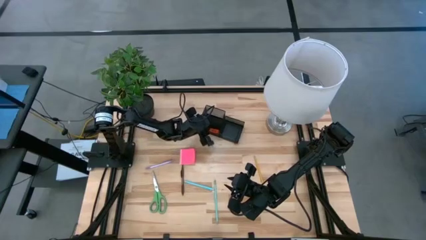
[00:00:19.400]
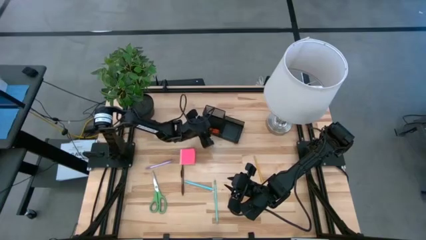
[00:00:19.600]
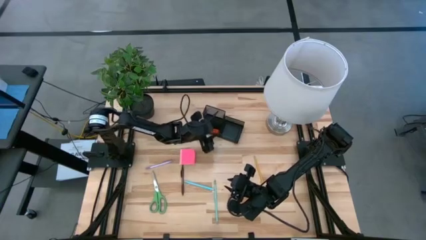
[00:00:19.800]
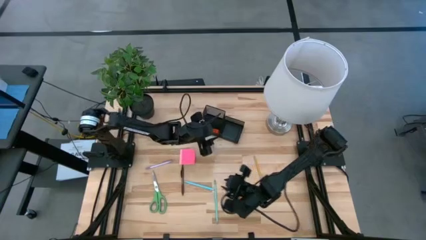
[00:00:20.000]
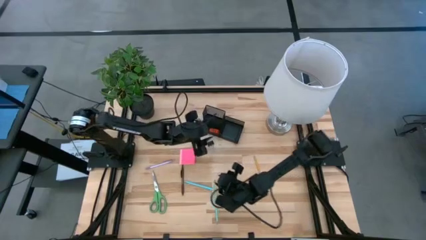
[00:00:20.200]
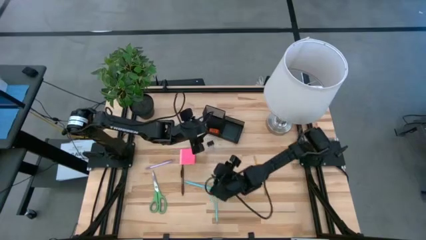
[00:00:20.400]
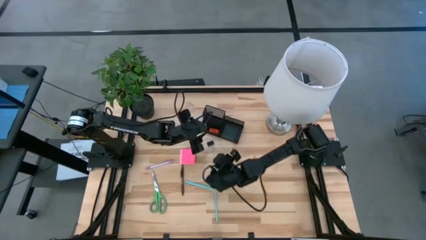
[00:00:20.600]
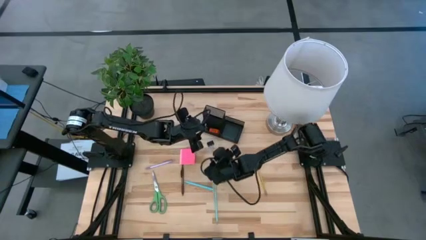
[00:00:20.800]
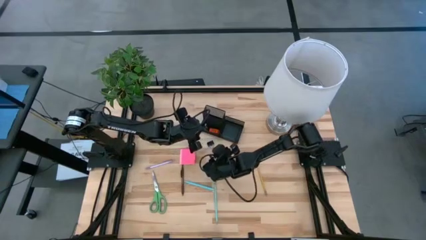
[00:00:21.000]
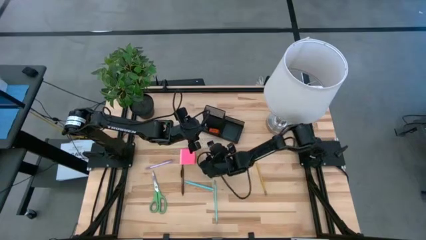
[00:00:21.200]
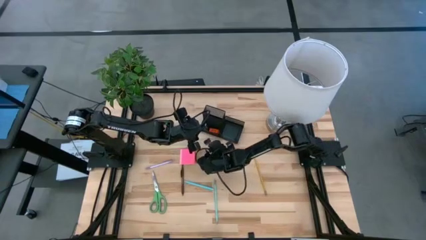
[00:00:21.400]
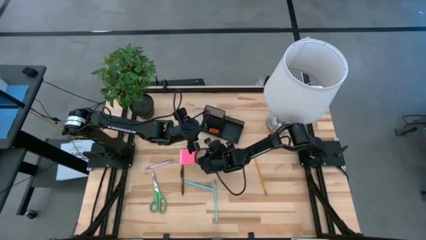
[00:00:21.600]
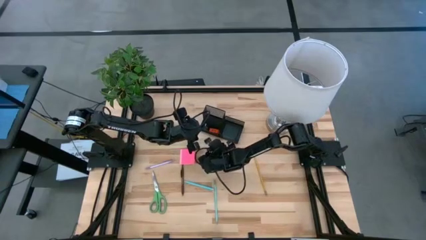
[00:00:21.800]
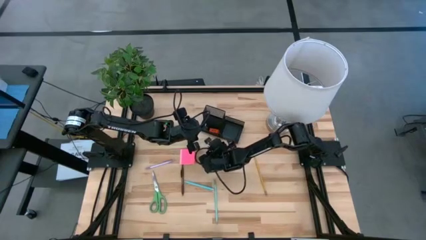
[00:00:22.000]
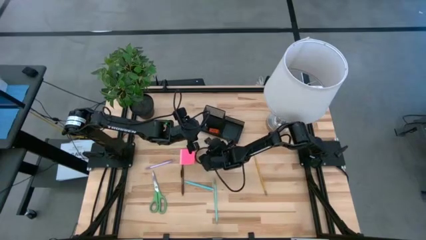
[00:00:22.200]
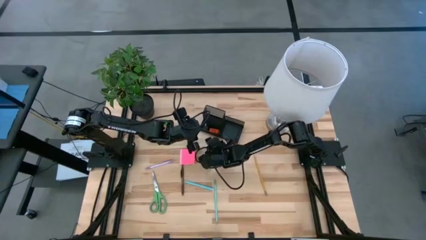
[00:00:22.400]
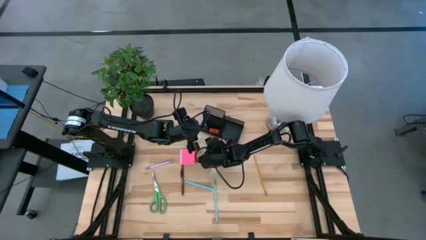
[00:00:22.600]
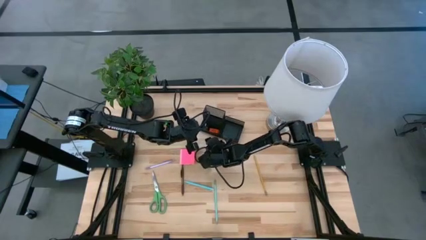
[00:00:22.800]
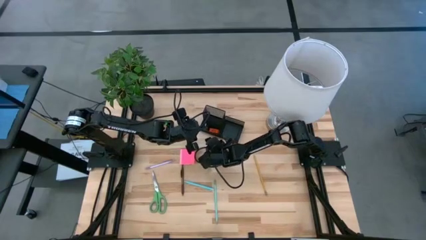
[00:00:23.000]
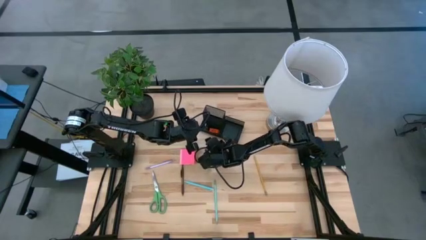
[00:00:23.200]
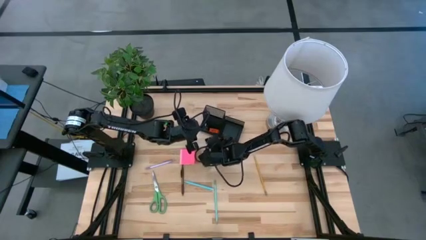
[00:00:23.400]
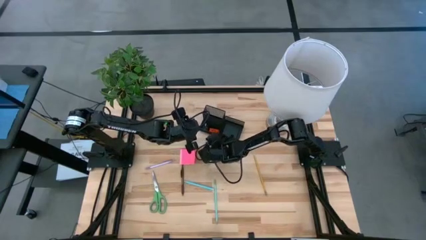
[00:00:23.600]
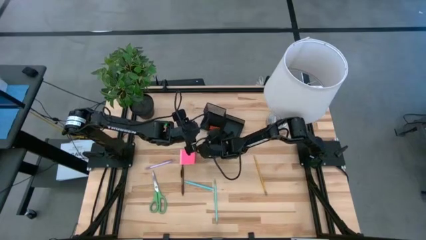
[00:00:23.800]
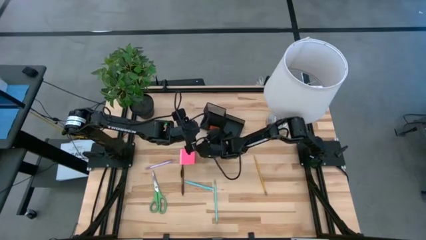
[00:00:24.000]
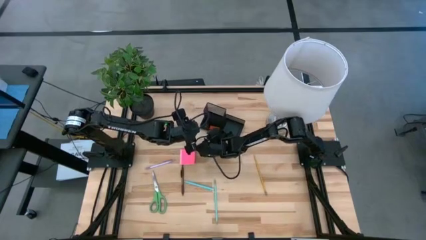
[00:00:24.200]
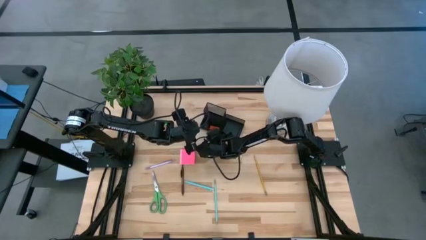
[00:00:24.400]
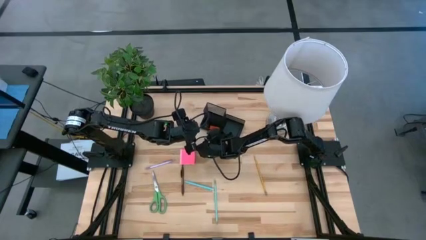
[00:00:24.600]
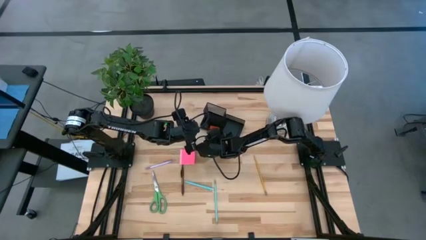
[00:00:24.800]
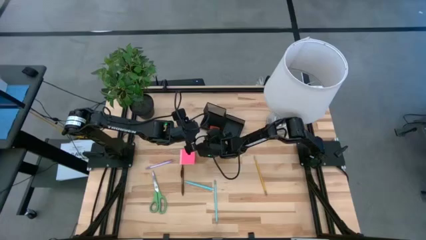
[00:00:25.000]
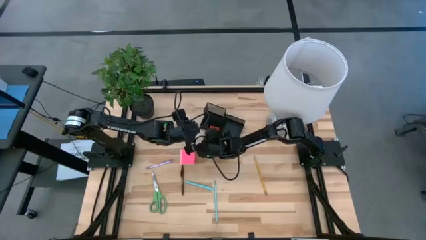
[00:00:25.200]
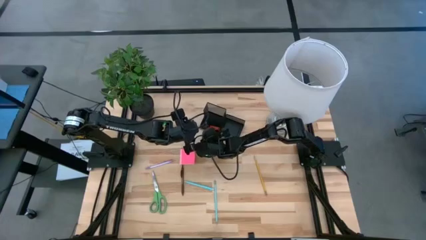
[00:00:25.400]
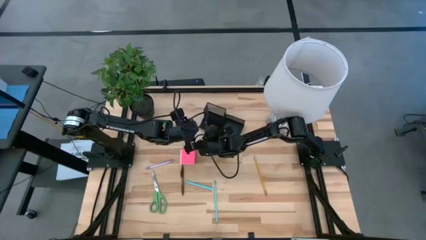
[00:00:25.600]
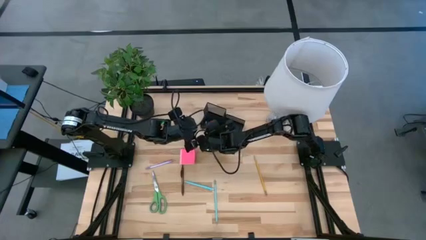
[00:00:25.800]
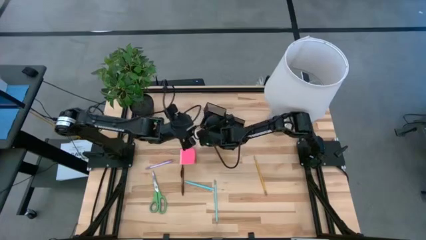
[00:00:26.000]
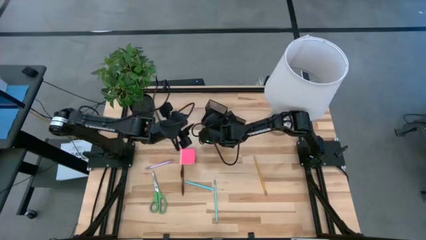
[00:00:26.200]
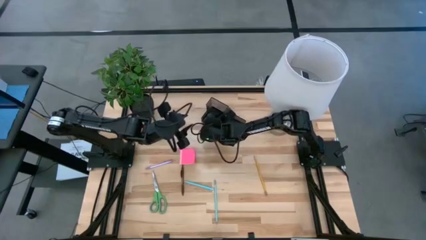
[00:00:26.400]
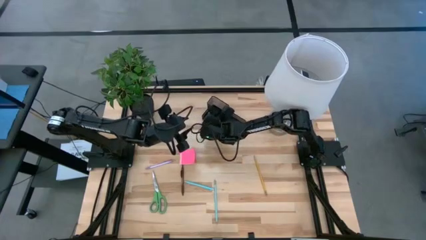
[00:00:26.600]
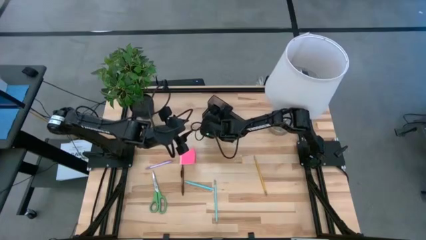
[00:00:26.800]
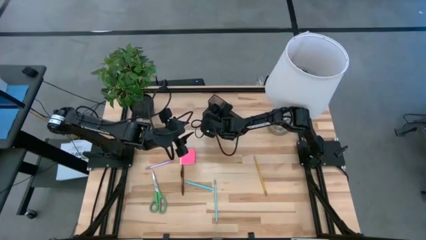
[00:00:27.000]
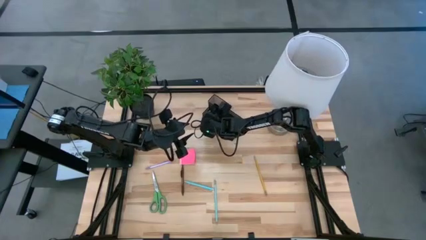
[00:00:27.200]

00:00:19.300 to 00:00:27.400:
Task: Pick and place office supplies into organizer
Put the black binder clip into the desk organizer

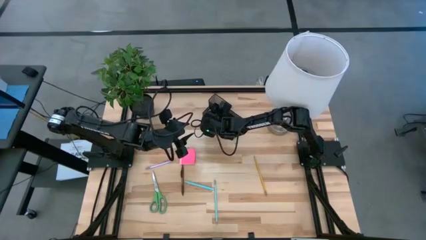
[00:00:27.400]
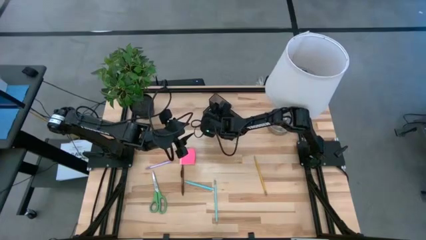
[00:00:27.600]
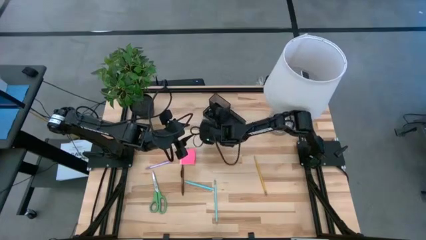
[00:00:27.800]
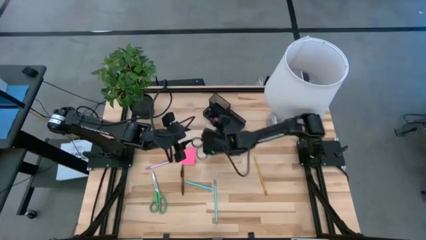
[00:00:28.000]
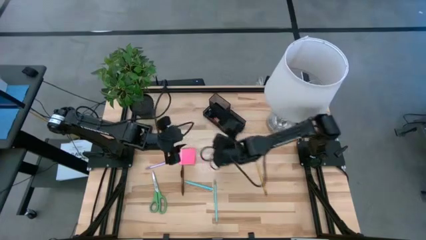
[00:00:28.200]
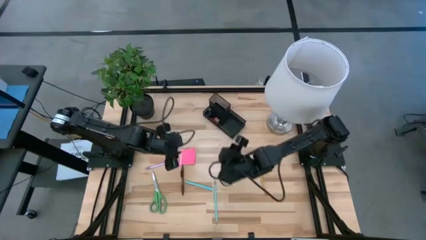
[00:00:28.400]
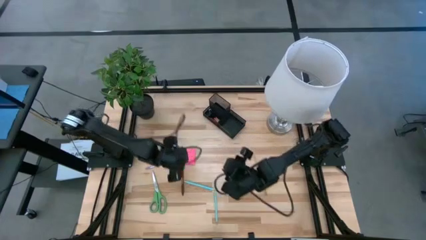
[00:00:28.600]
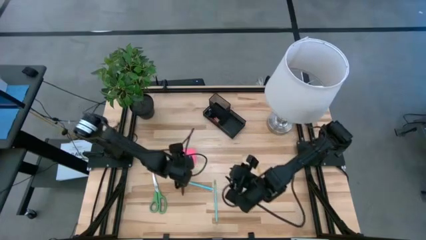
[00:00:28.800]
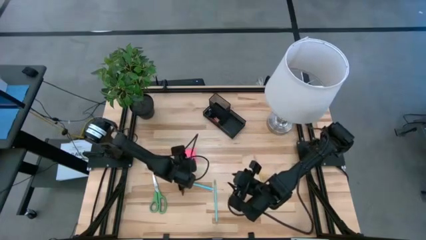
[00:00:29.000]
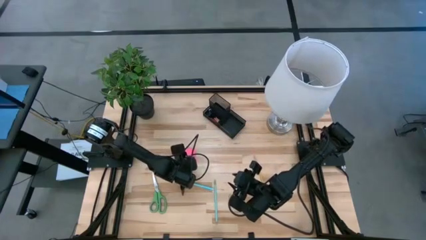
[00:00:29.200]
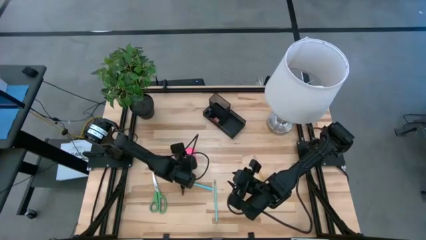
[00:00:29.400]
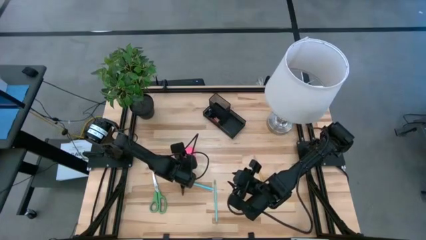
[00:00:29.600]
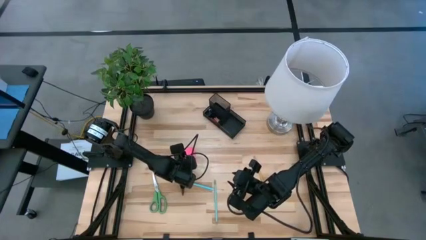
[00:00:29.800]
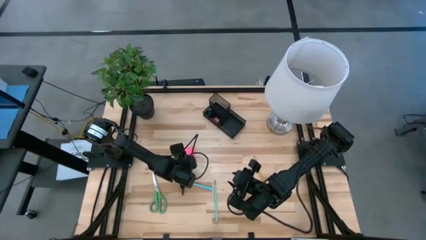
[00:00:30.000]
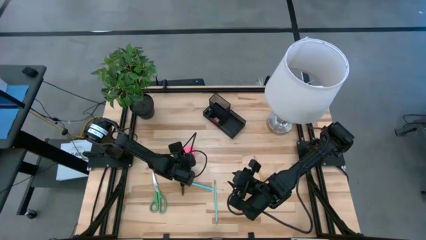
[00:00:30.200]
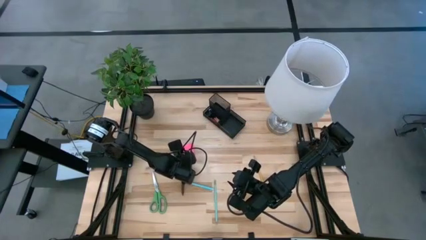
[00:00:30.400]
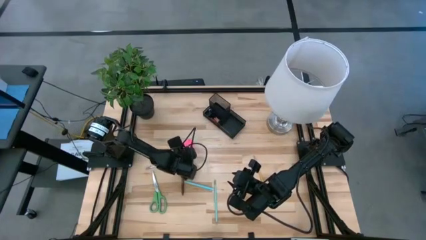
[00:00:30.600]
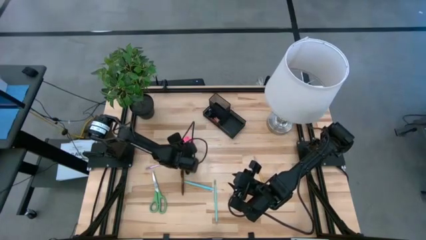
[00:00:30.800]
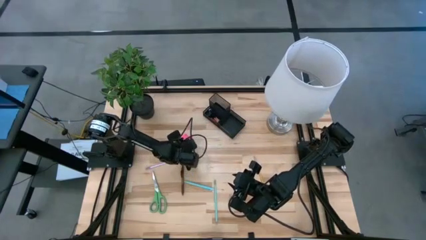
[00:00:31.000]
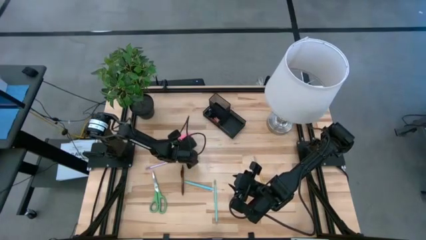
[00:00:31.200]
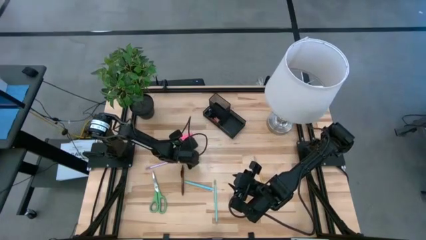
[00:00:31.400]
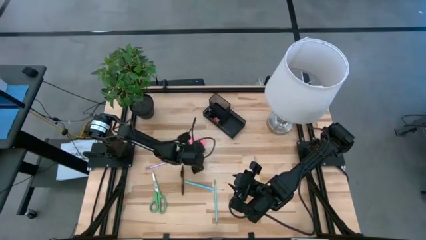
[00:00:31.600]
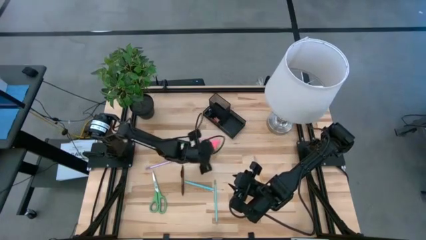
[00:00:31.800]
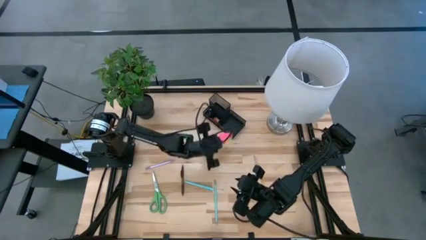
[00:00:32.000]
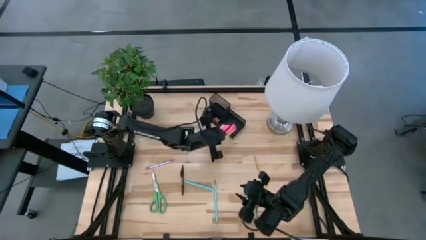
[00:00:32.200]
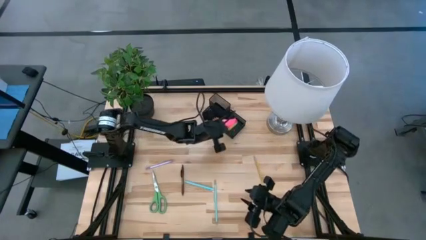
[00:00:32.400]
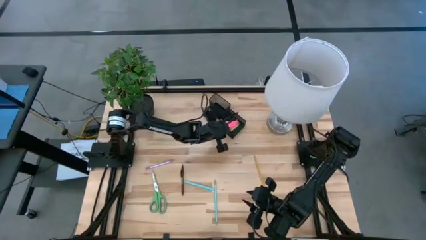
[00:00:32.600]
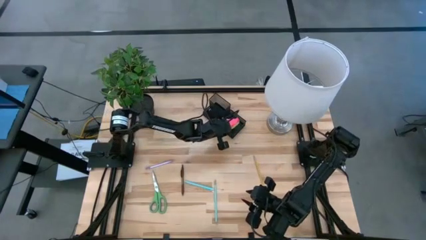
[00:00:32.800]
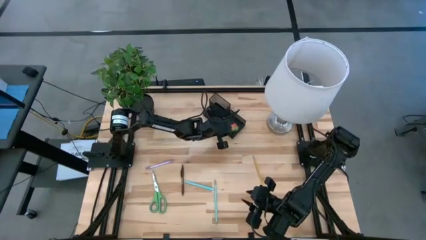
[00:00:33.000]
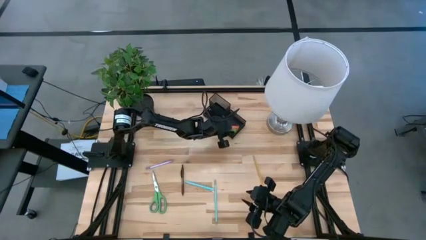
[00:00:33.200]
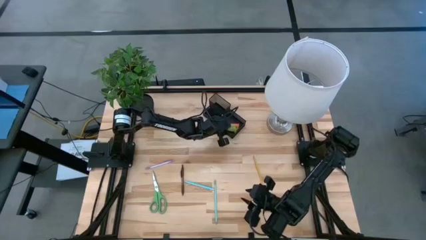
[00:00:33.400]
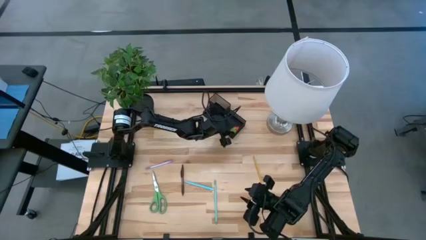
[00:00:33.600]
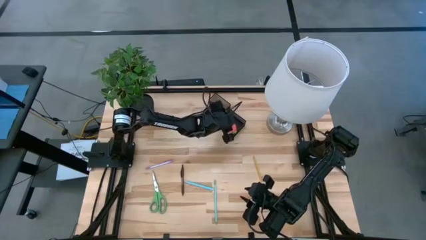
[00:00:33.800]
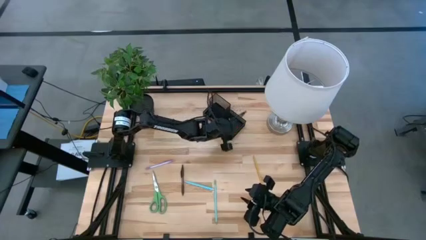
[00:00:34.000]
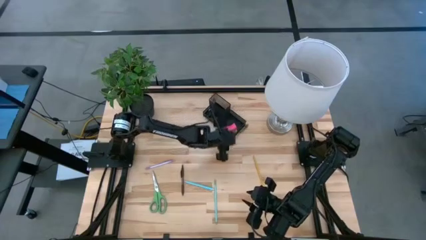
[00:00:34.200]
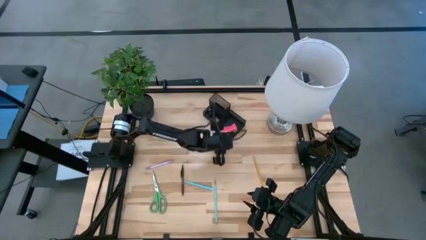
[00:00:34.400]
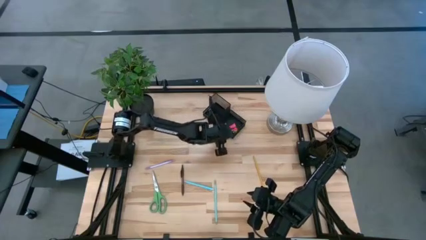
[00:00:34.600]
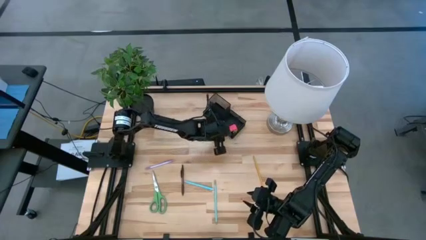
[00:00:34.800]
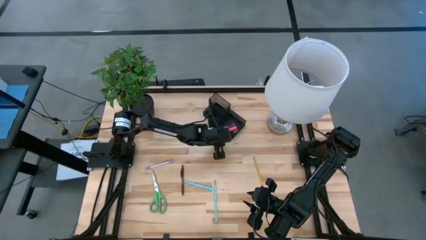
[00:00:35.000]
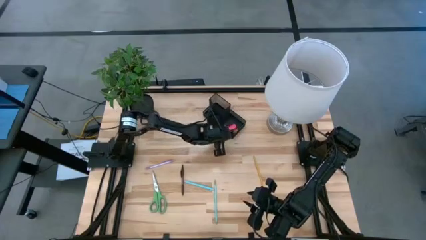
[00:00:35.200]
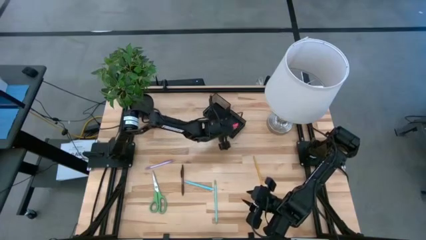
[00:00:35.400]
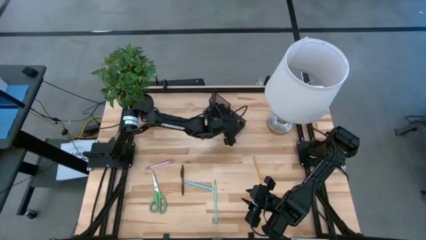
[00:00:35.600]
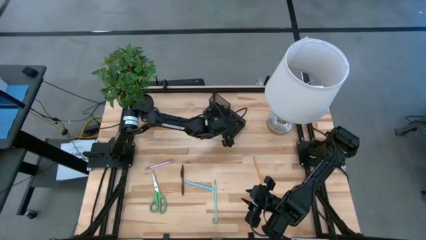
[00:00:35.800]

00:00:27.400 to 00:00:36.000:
Put the sticky notes into the desk organizer
